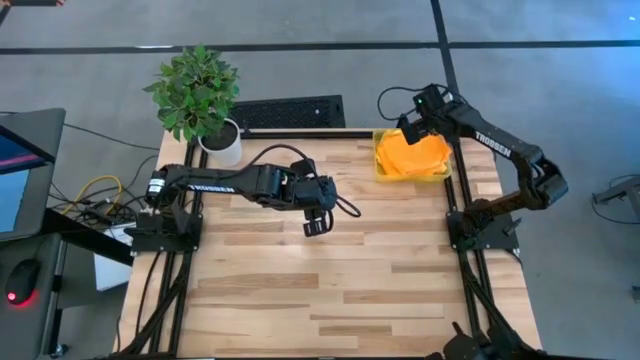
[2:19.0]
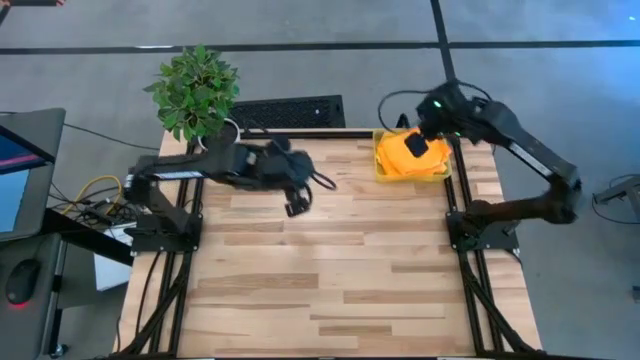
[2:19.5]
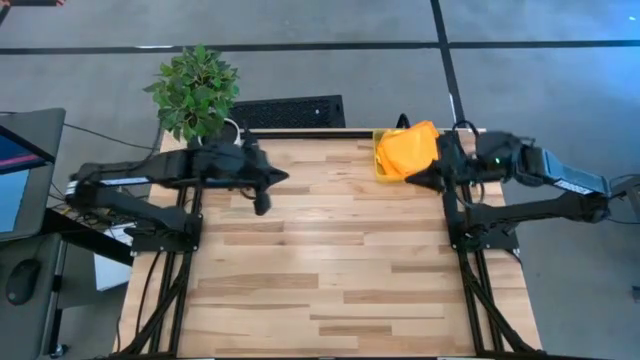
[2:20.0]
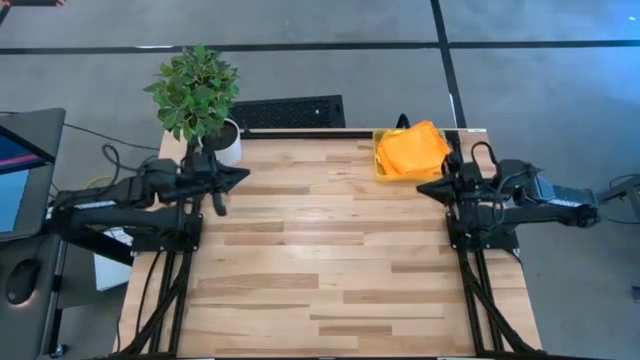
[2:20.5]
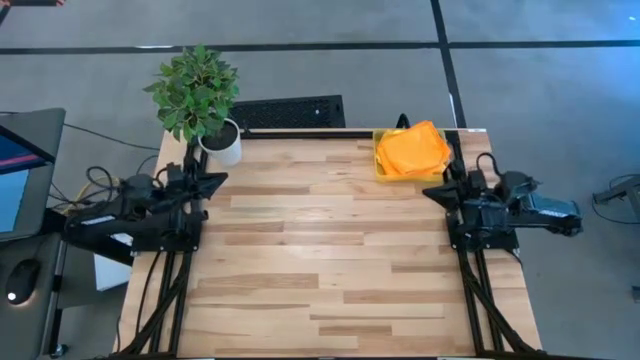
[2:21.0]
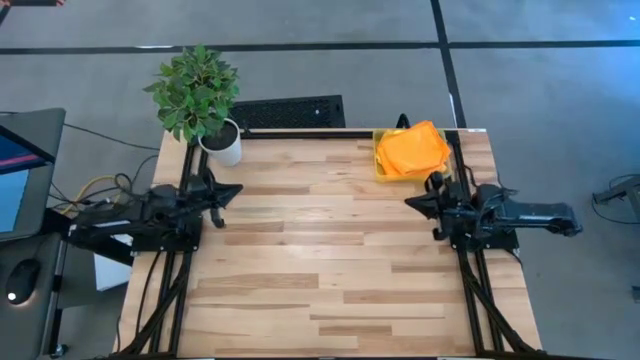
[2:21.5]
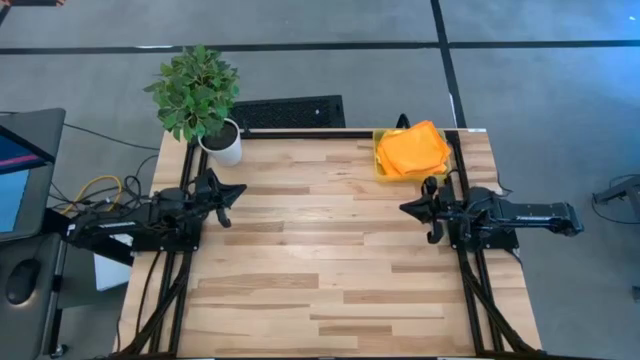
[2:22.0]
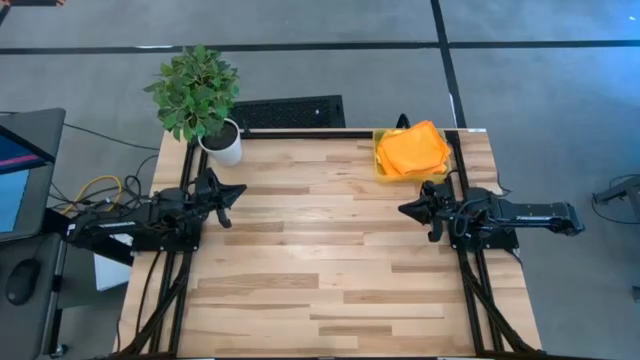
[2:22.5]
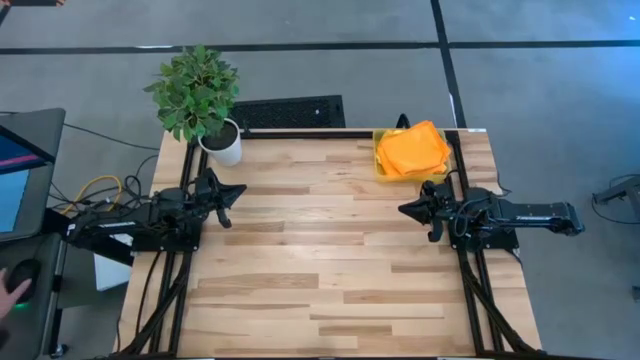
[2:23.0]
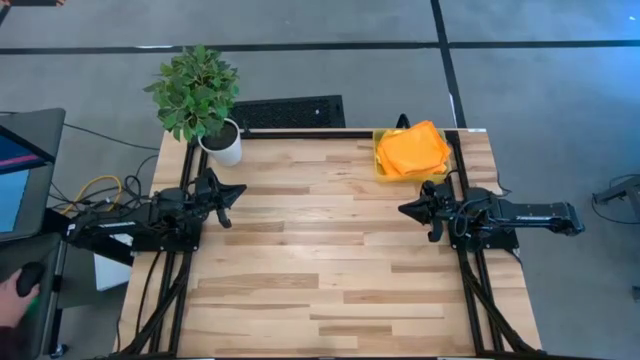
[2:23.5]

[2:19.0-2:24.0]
Task: Fold microfiber towels
Return to Home Position

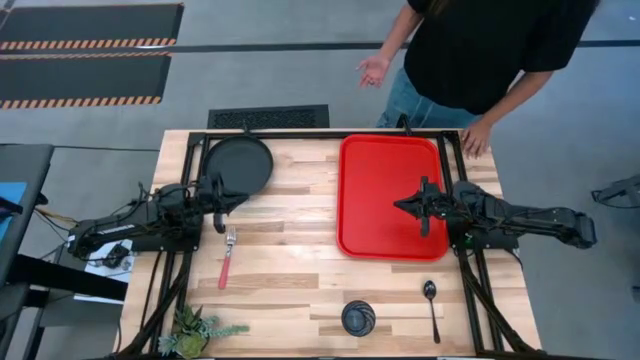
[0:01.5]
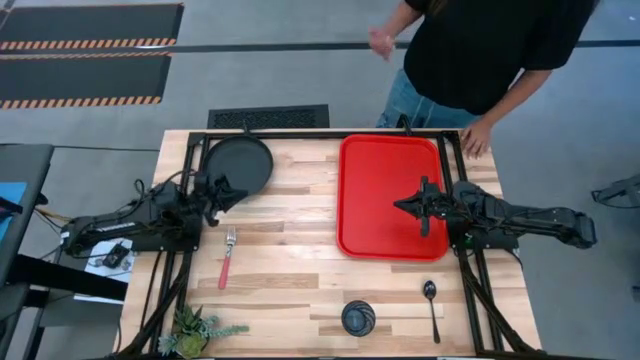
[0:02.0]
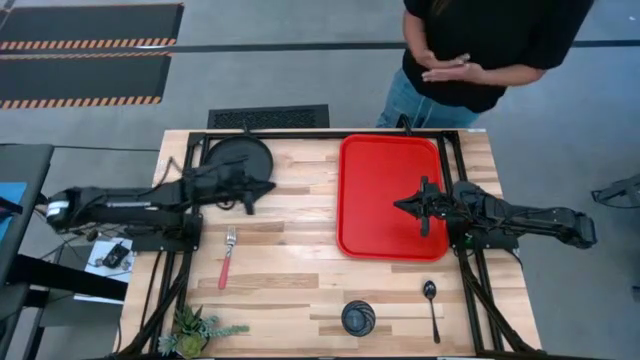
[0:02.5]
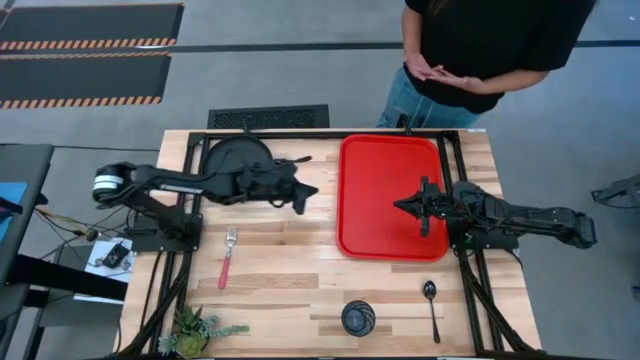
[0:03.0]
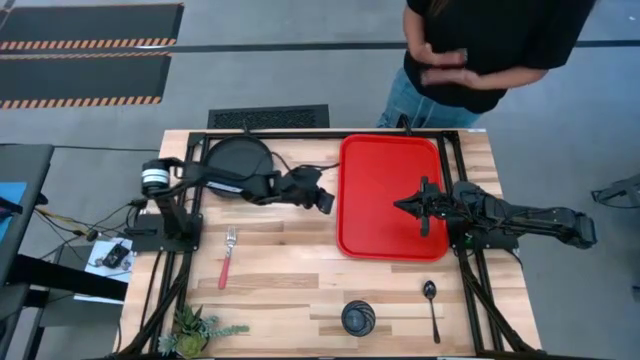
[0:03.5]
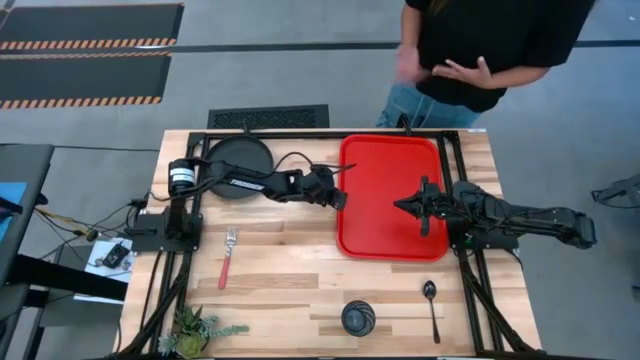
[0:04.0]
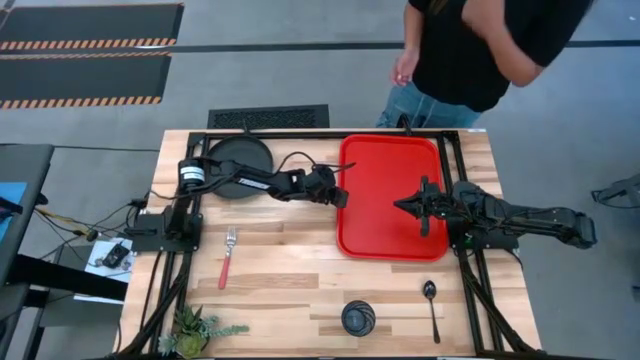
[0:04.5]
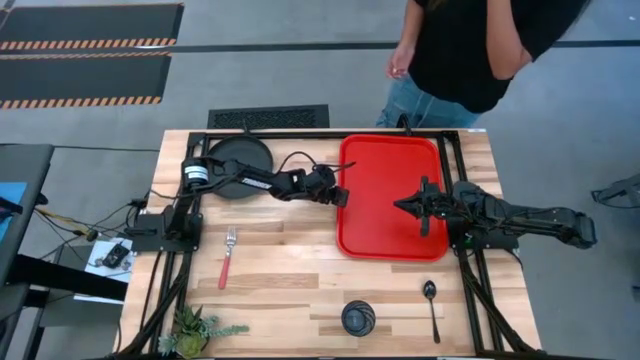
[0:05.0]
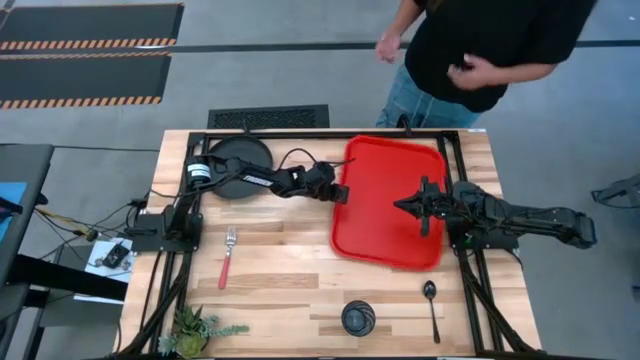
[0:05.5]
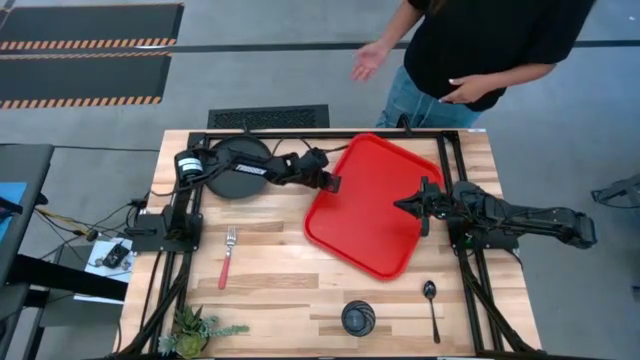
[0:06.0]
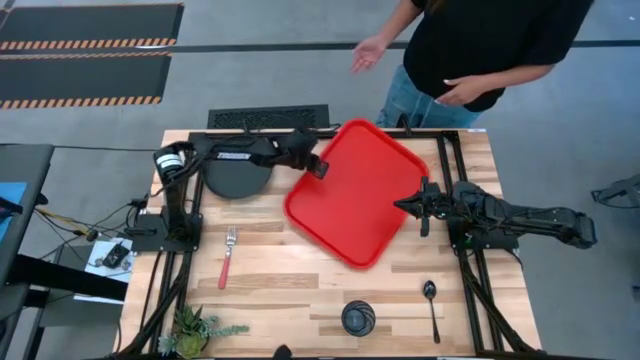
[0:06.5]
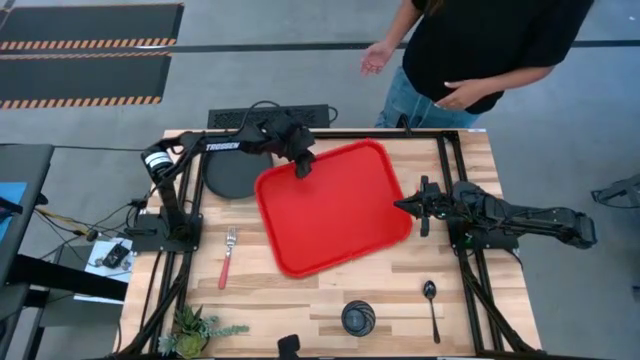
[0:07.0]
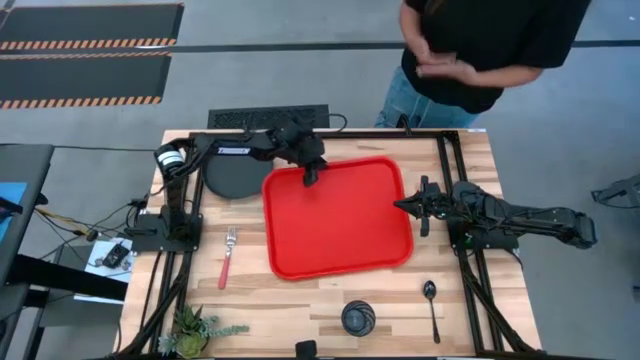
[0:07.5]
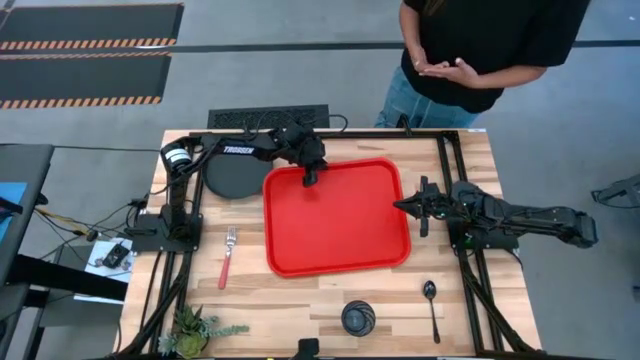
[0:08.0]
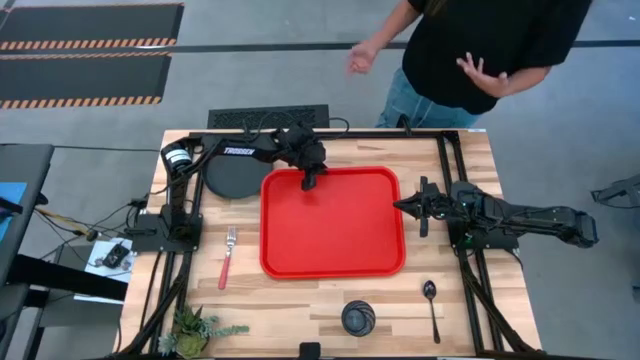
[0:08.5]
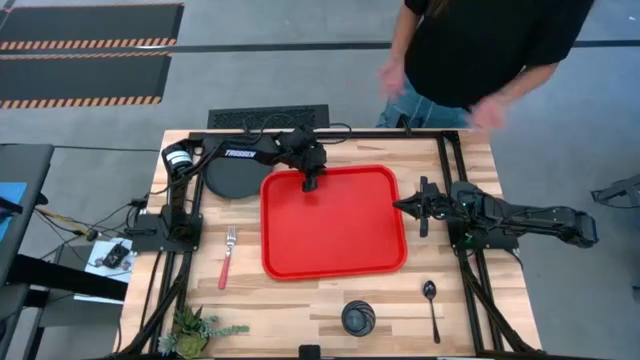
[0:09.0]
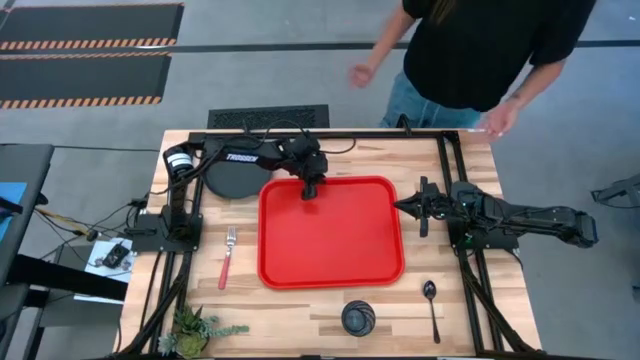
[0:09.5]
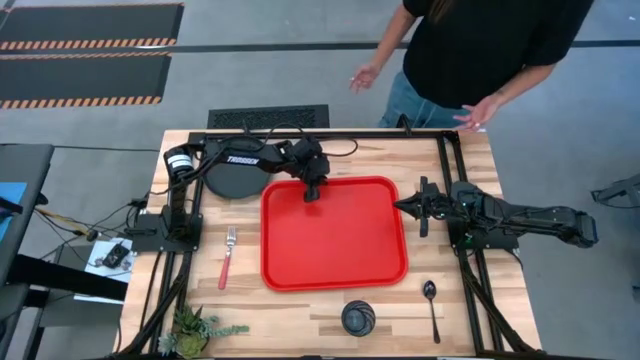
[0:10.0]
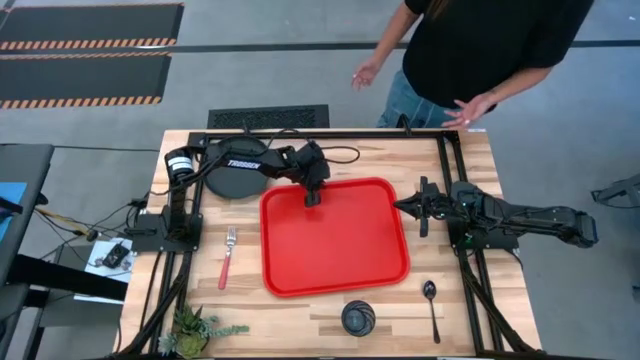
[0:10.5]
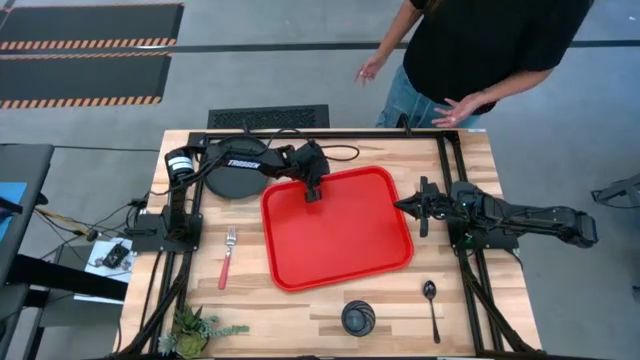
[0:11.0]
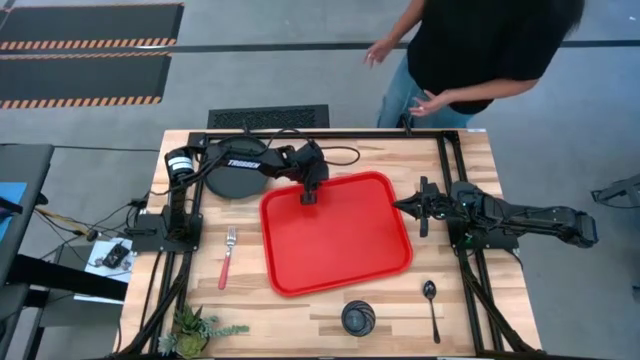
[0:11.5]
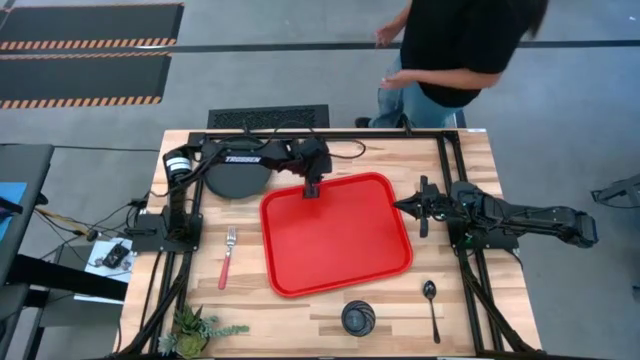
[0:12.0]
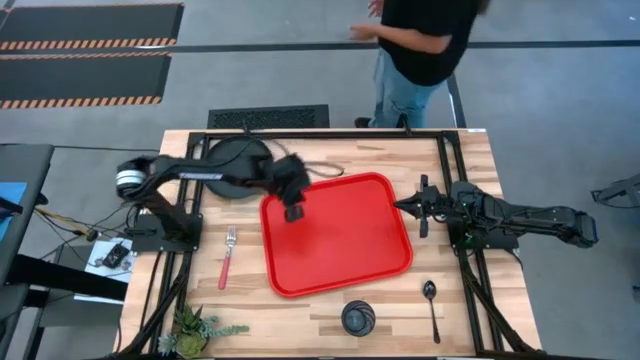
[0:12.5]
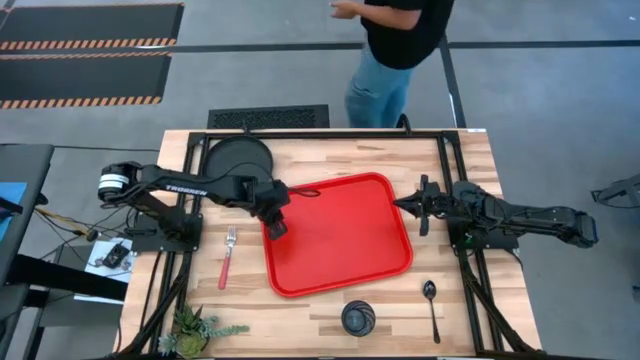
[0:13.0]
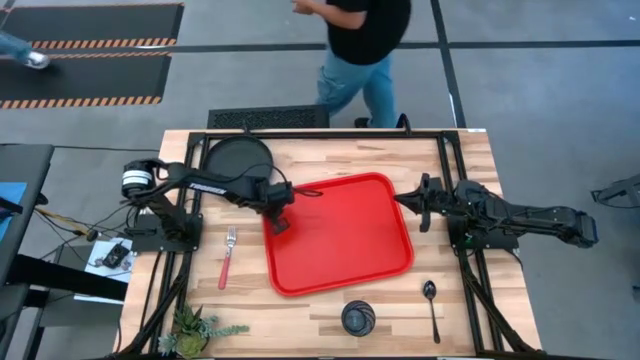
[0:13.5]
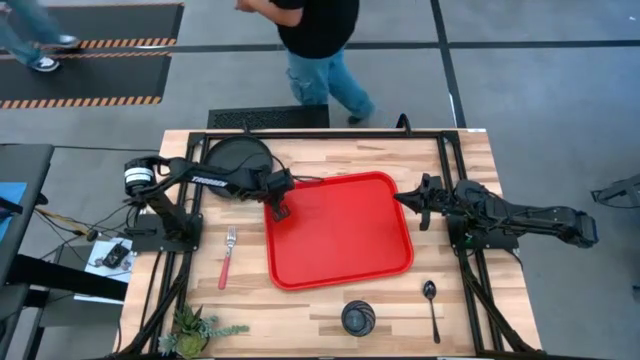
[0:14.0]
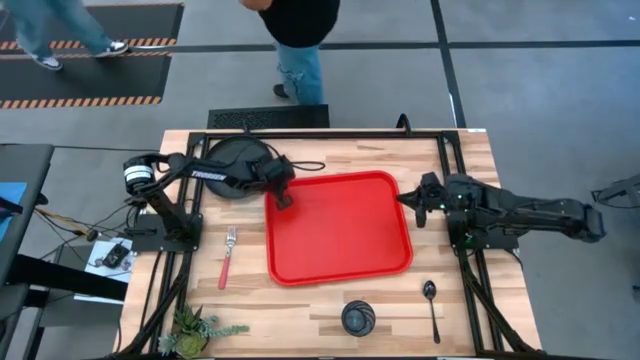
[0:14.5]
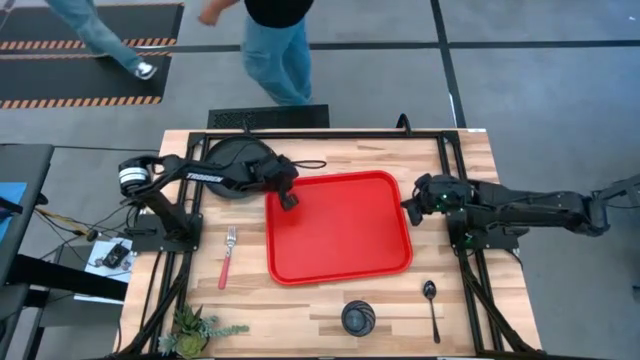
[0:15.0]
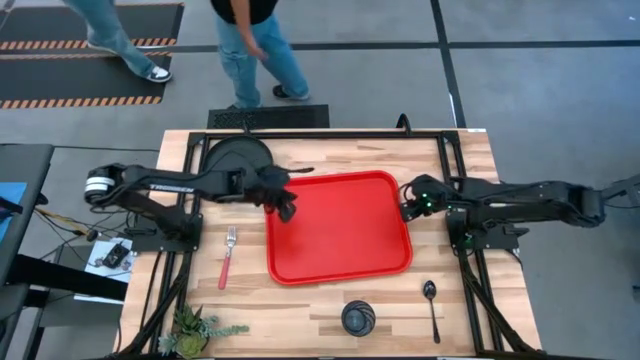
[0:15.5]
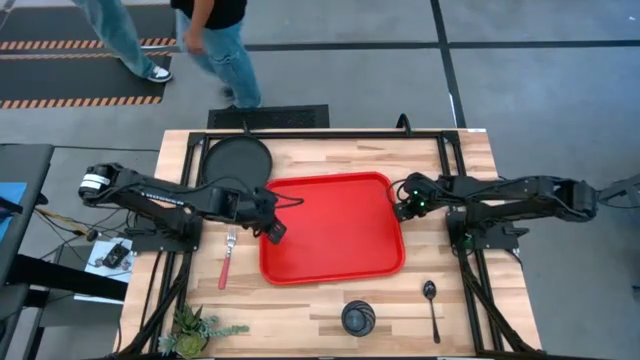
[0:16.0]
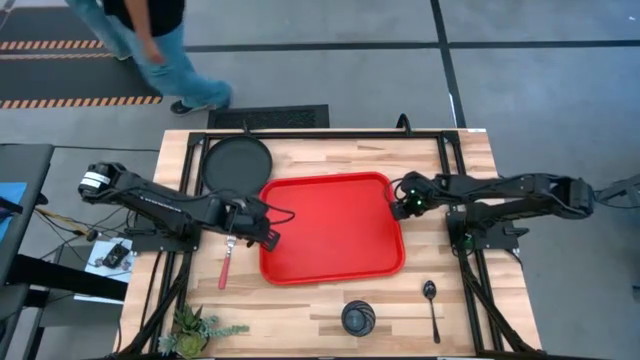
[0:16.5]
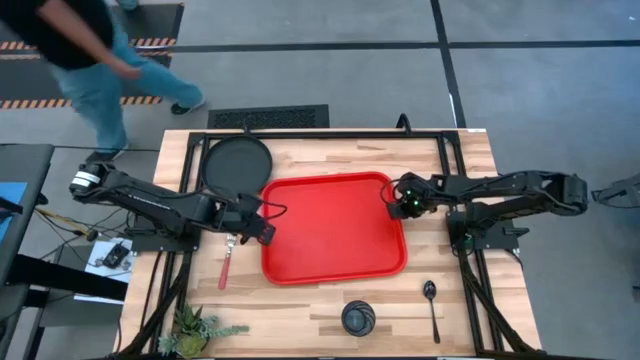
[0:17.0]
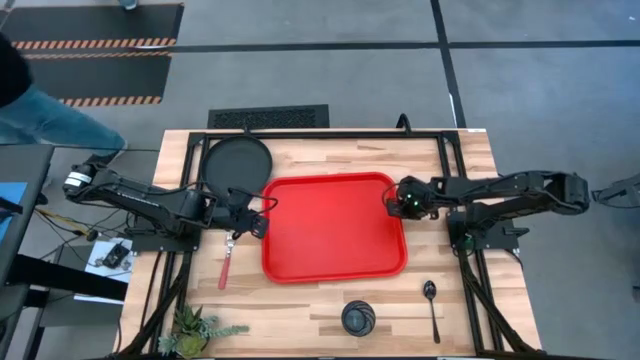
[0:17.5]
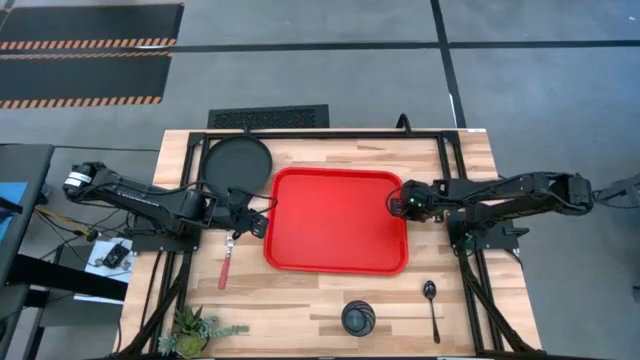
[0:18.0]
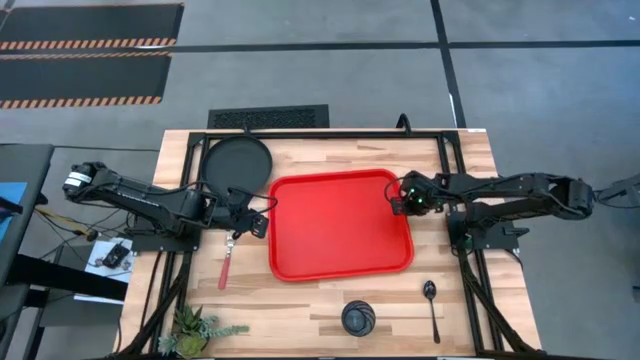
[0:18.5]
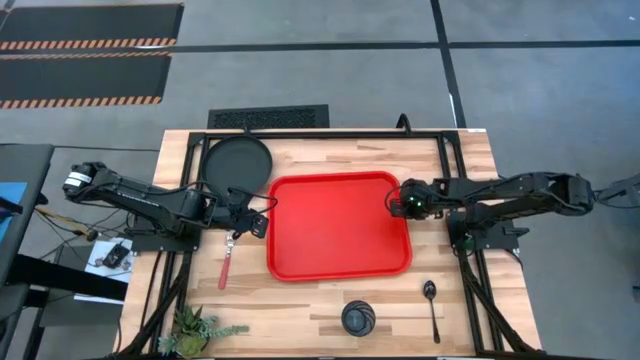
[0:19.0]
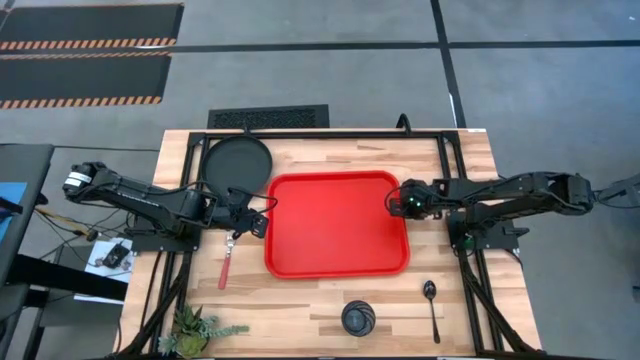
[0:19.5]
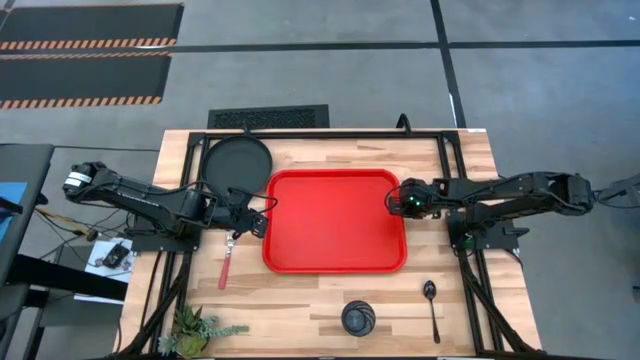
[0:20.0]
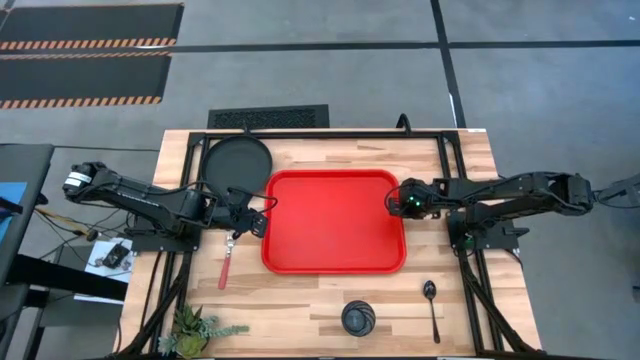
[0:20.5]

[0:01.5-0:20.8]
Task: Pick and place plate/cup/fork/spoon on tray
Move the orange tray to the center of the table
